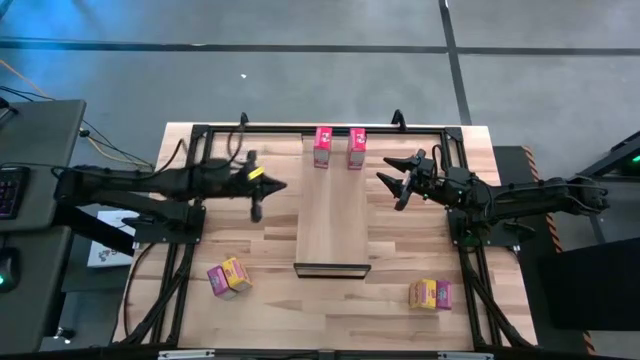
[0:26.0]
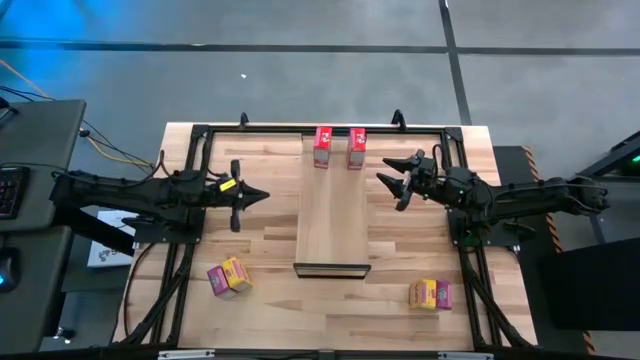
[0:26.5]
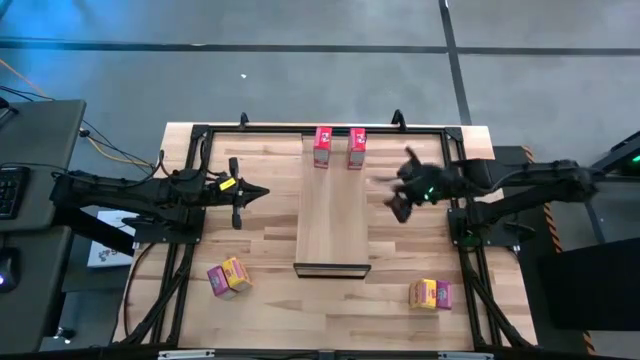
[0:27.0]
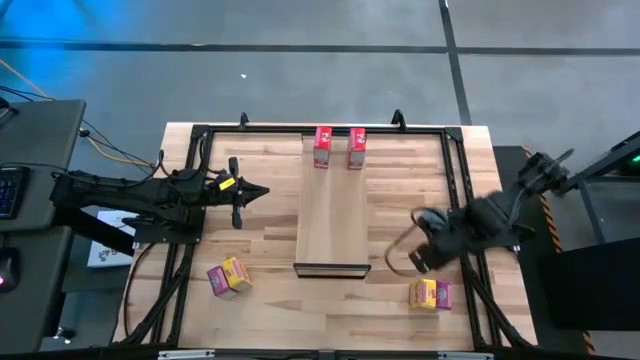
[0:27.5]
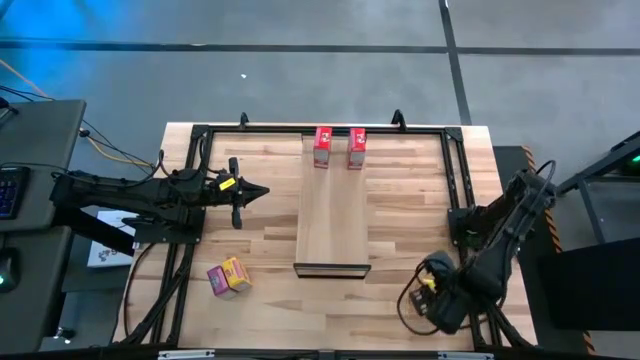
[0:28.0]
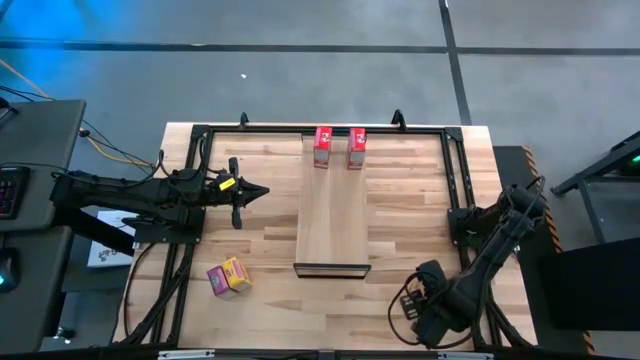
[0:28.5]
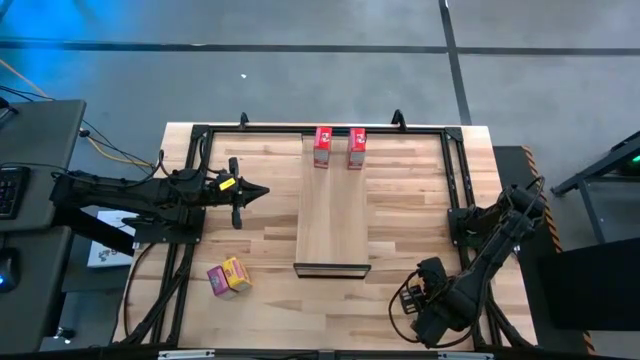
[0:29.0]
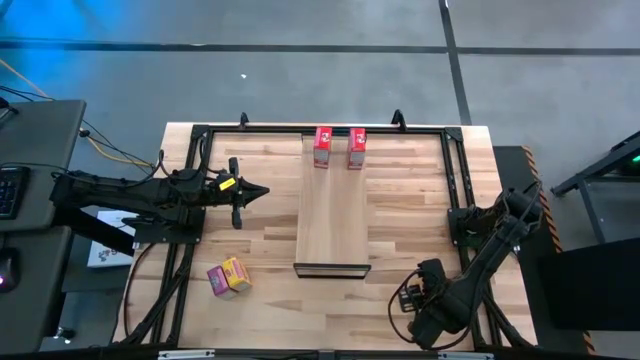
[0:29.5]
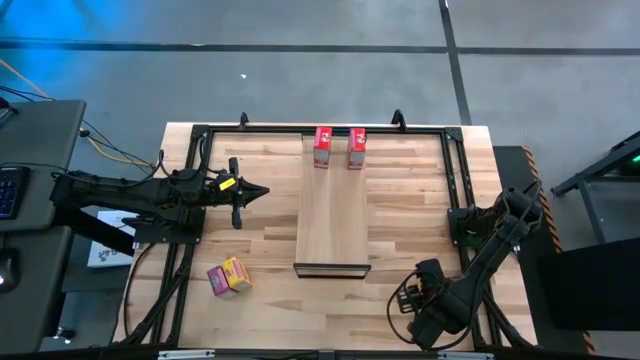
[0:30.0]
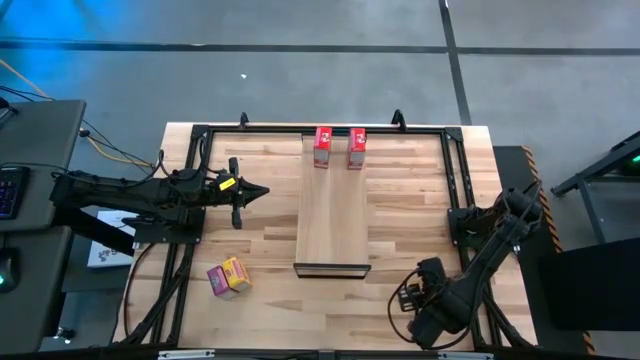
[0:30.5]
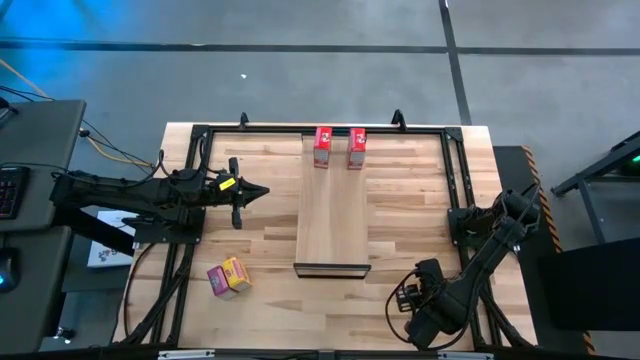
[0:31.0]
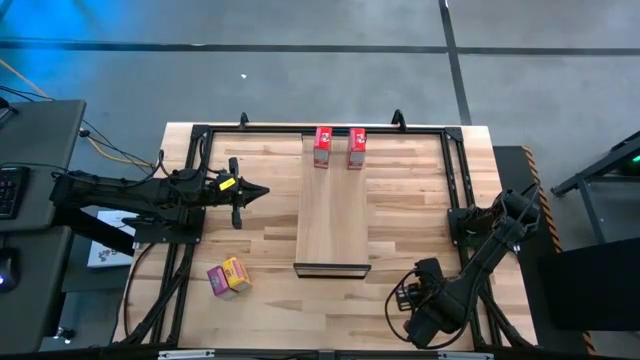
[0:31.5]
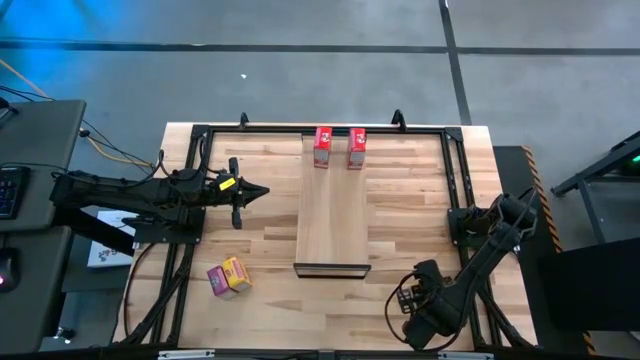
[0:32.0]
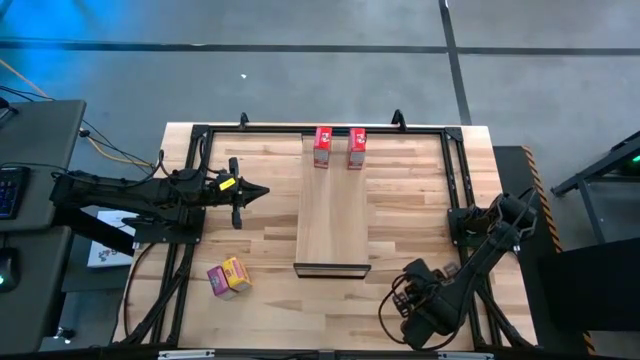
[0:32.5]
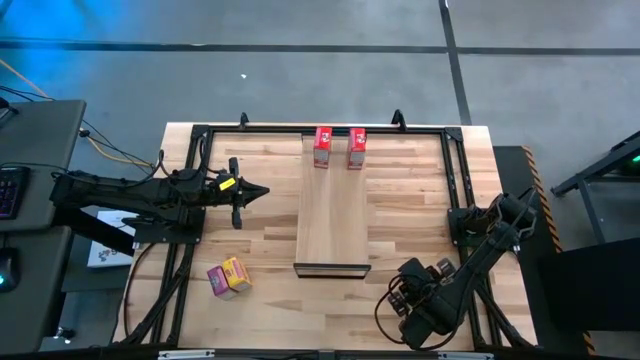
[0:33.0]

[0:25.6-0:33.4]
Task: Stack cereal on shelf
Put the right yellow cereal box on the shelf

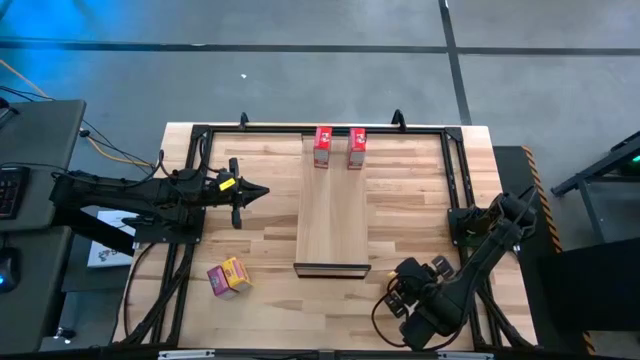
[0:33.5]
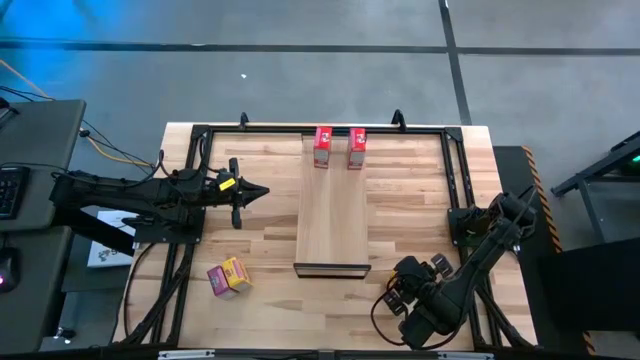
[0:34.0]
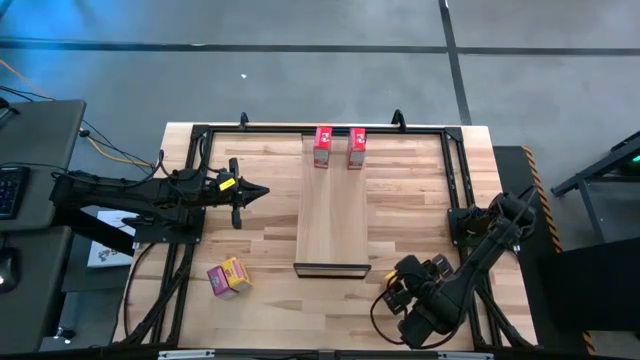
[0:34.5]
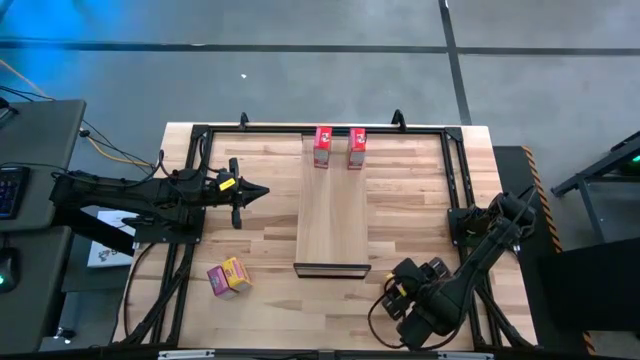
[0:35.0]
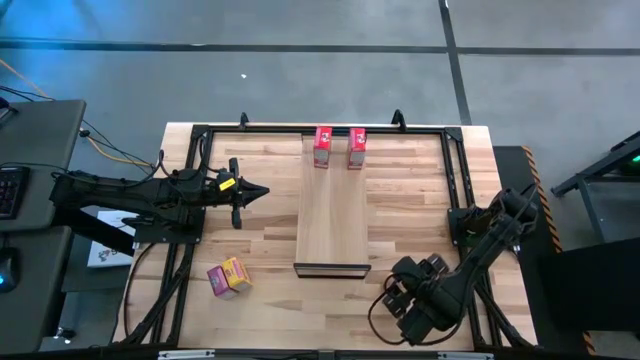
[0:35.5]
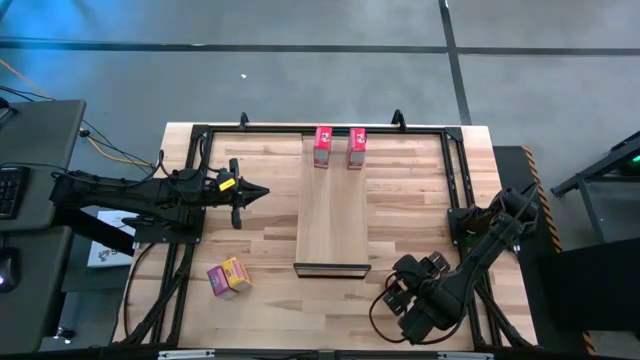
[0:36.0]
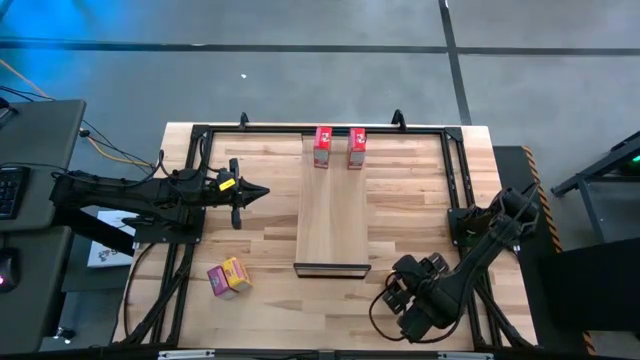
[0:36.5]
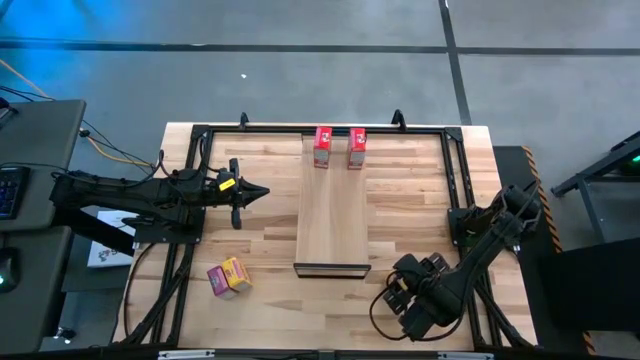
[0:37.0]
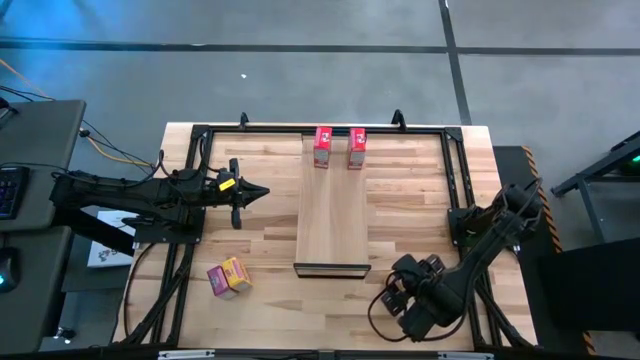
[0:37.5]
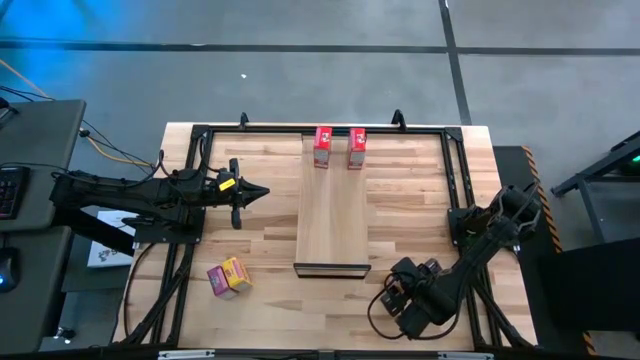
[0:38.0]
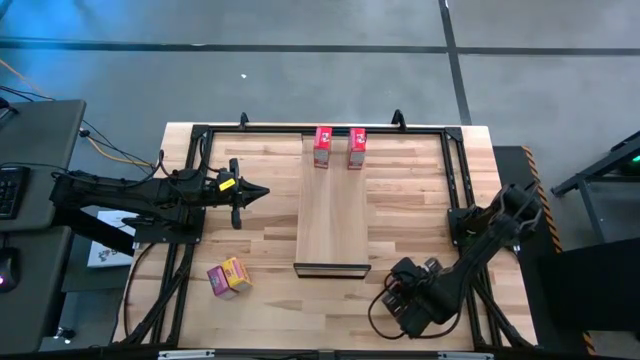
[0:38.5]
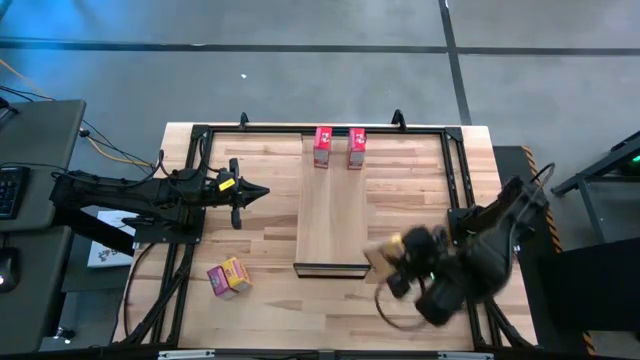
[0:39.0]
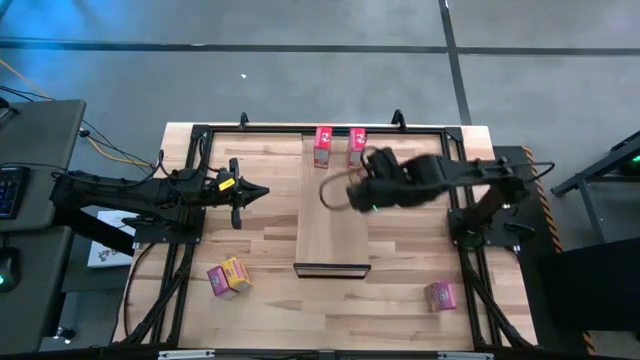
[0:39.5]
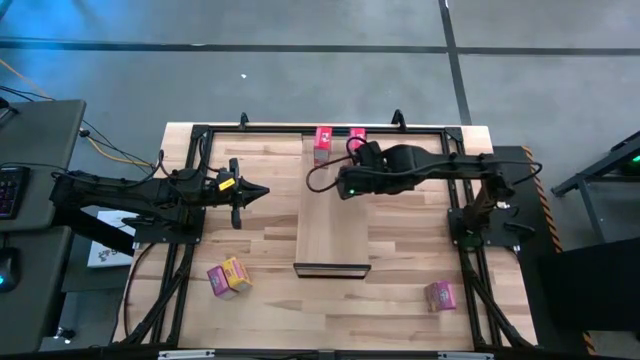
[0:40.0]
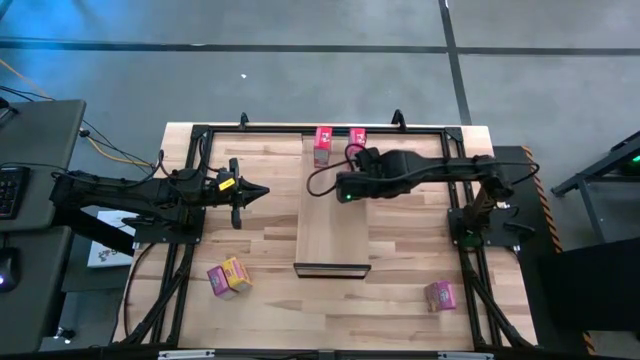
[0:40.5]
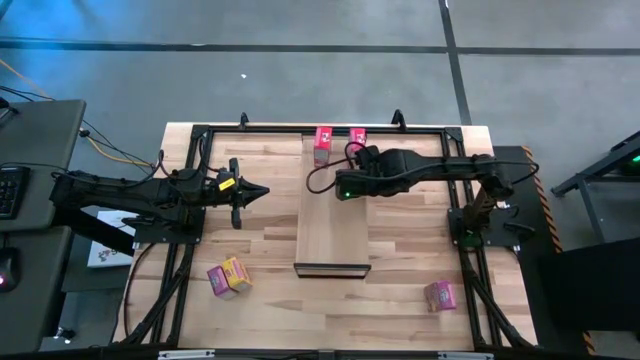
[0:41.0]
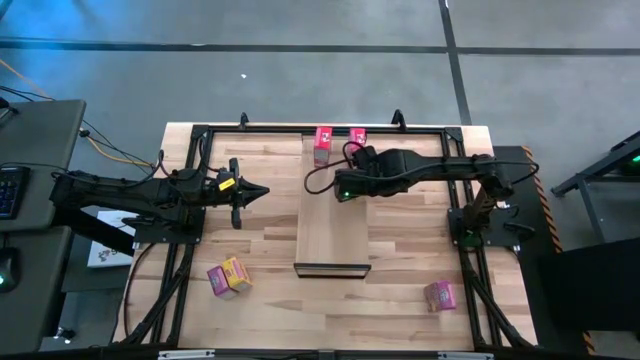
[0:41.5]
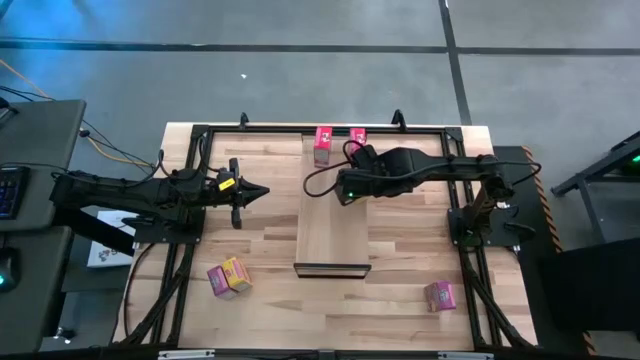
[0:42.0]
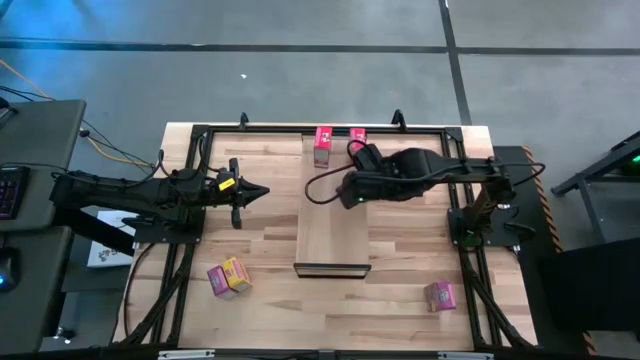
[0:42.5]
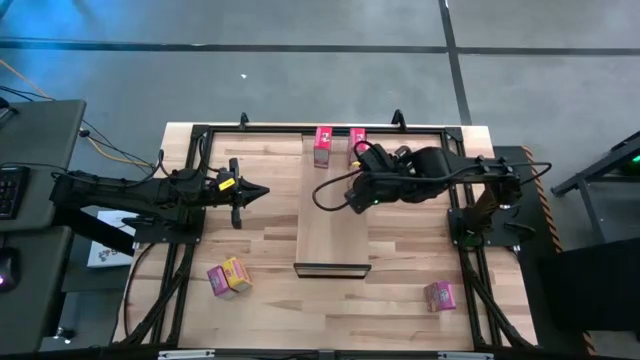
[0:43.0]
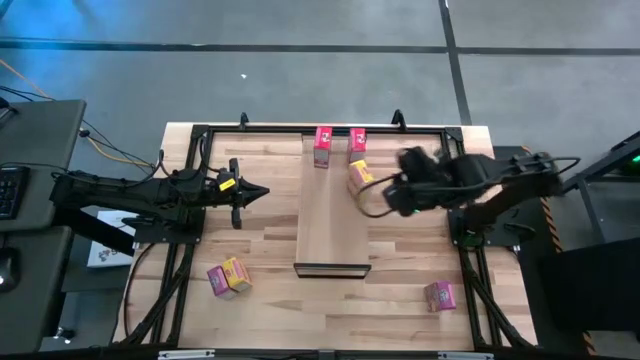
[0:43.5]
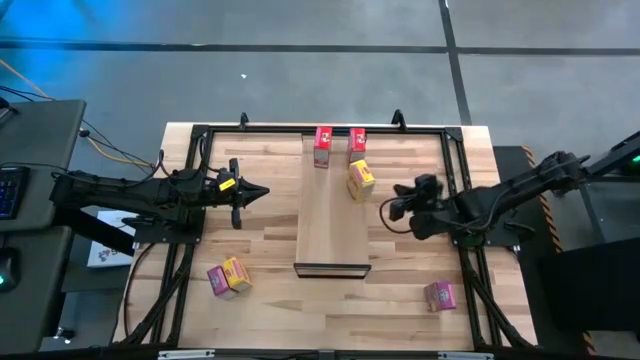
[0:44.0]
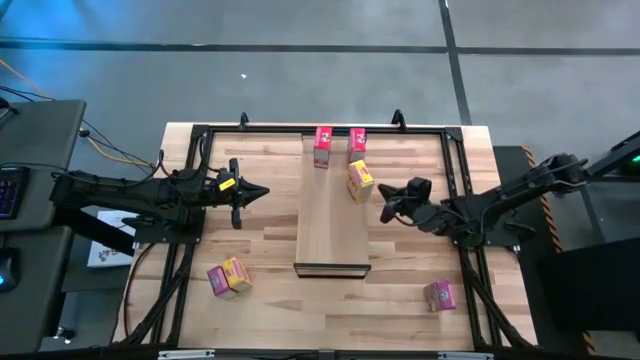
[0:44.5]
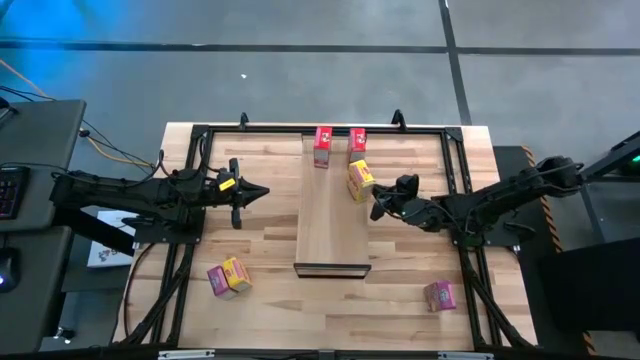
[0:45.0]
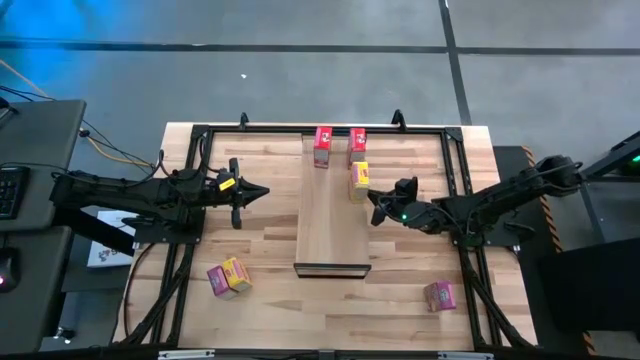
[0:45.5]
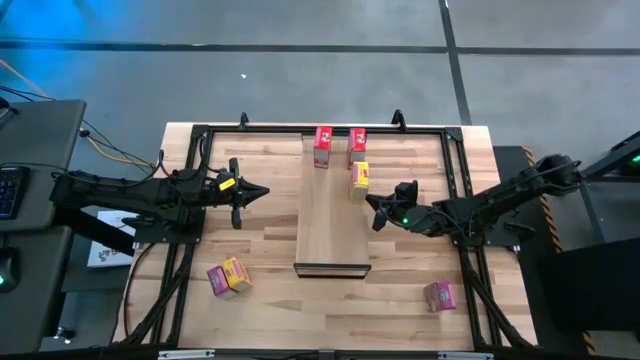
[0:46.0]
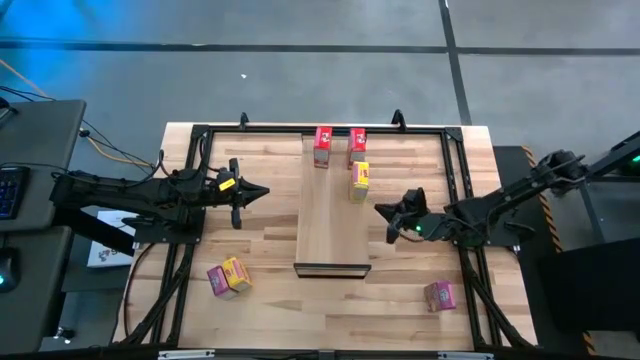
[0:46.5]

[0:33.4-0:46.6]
Put the right yellow cereal box on the shelf
